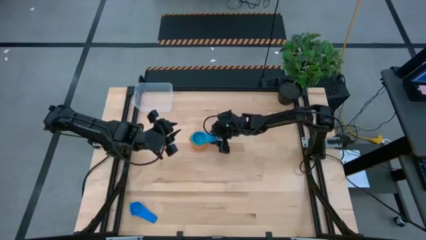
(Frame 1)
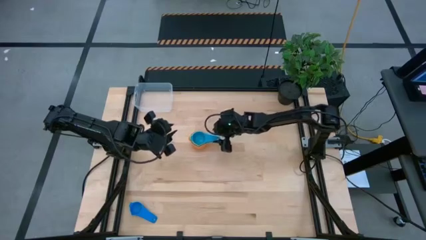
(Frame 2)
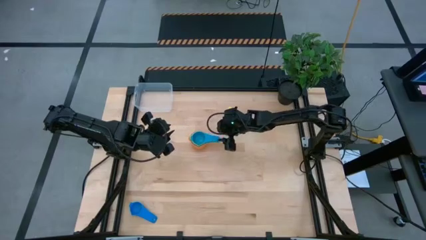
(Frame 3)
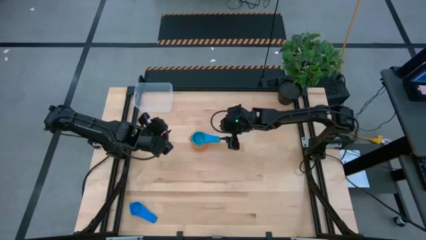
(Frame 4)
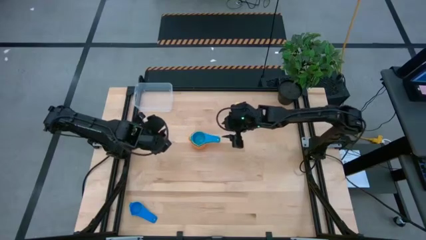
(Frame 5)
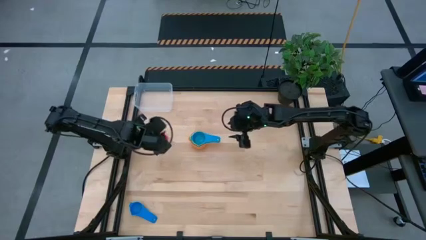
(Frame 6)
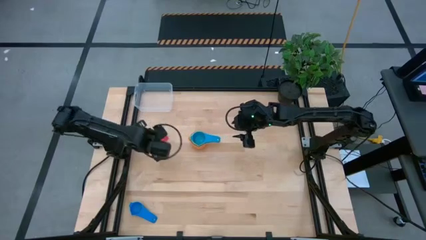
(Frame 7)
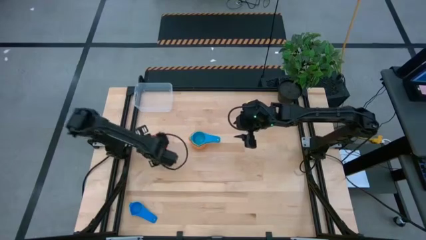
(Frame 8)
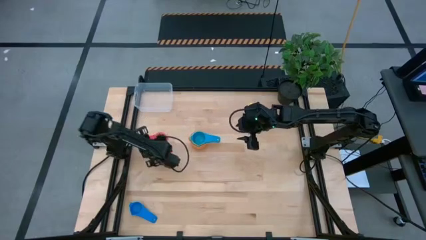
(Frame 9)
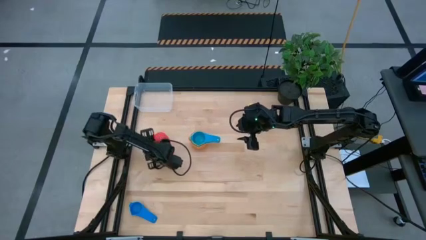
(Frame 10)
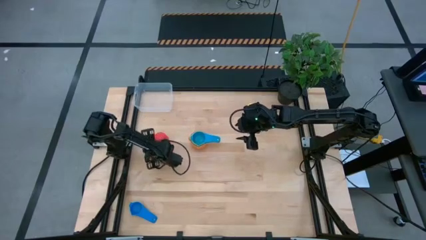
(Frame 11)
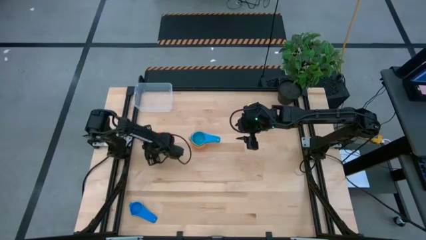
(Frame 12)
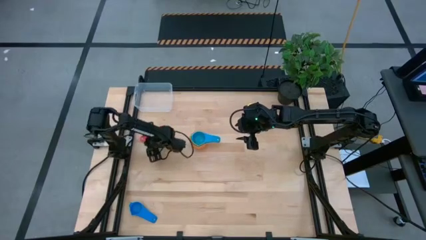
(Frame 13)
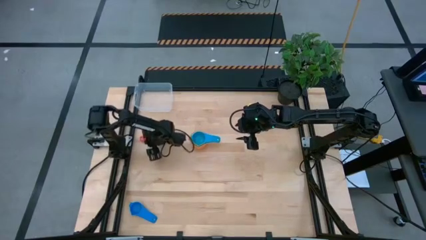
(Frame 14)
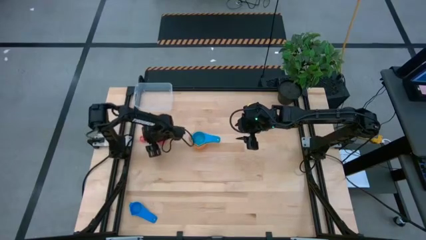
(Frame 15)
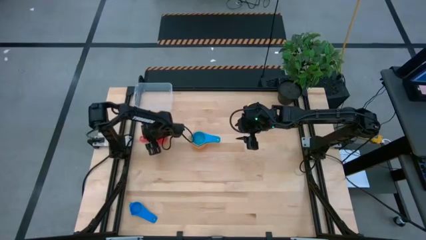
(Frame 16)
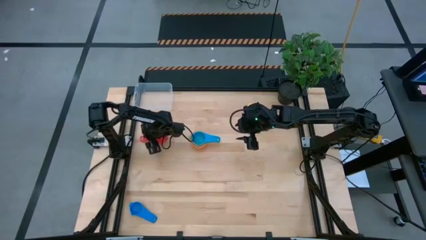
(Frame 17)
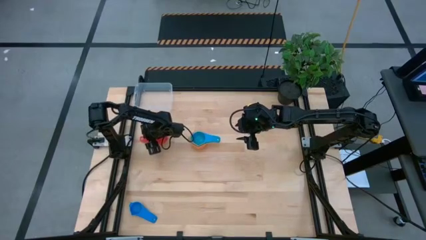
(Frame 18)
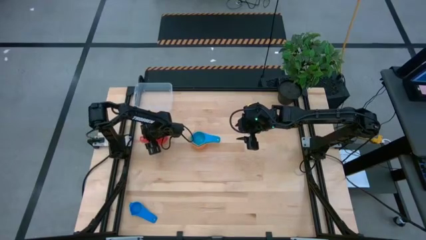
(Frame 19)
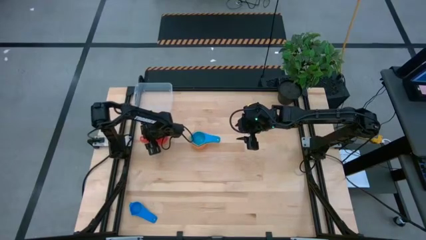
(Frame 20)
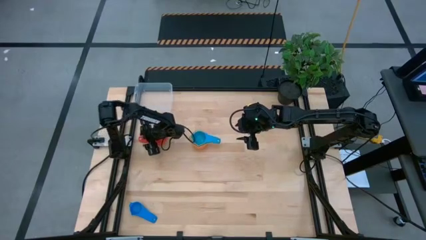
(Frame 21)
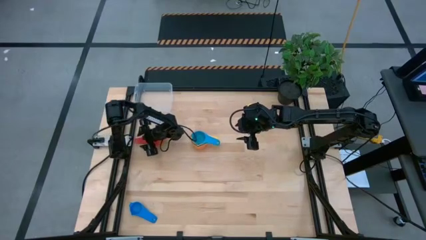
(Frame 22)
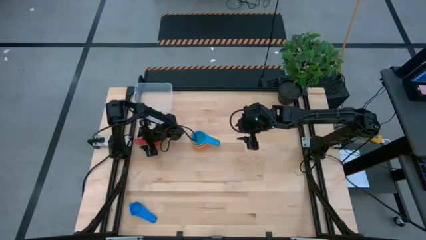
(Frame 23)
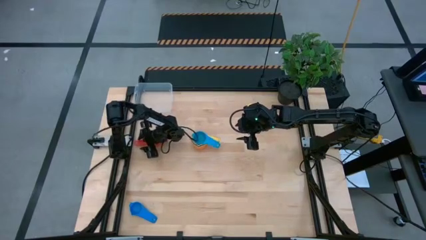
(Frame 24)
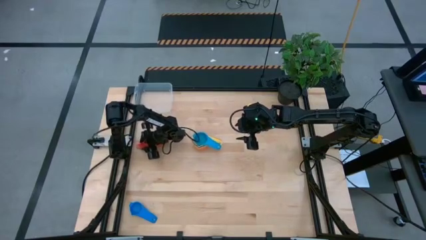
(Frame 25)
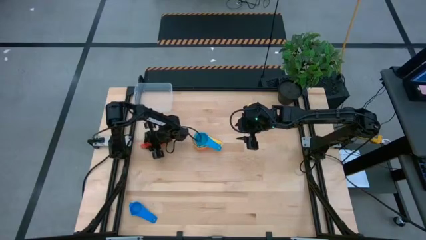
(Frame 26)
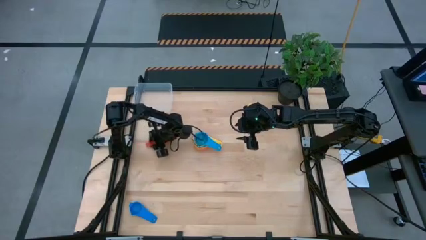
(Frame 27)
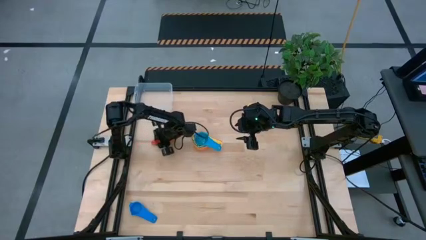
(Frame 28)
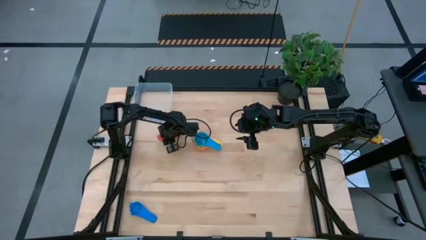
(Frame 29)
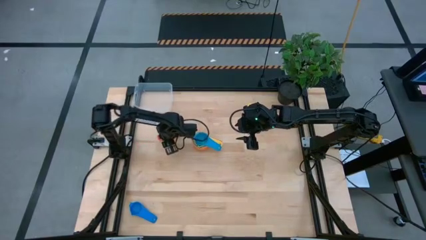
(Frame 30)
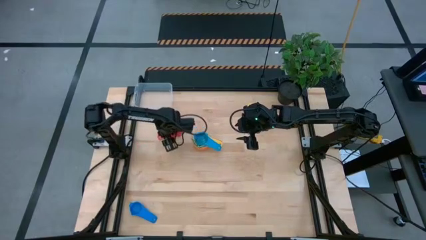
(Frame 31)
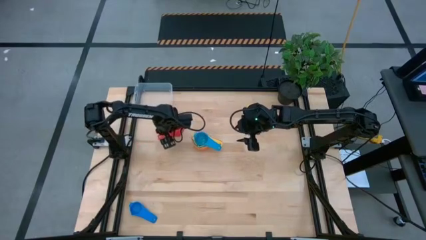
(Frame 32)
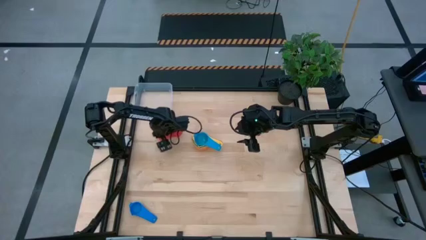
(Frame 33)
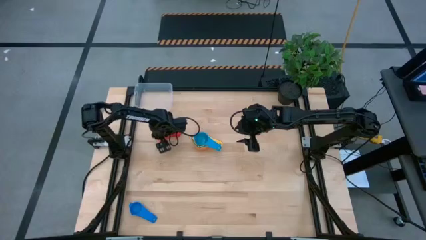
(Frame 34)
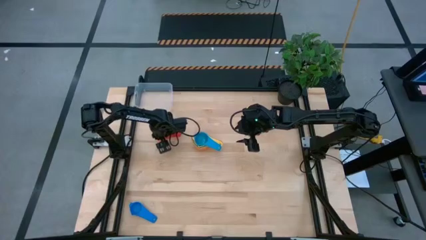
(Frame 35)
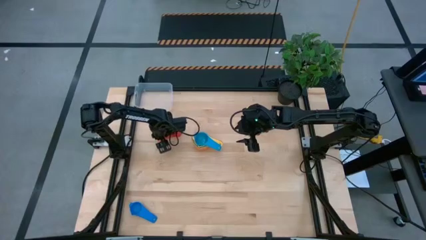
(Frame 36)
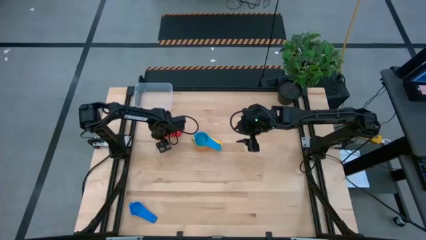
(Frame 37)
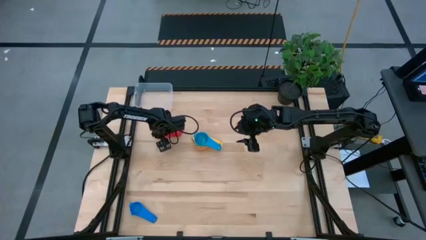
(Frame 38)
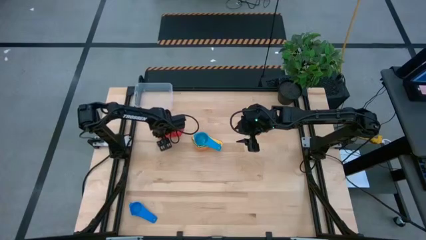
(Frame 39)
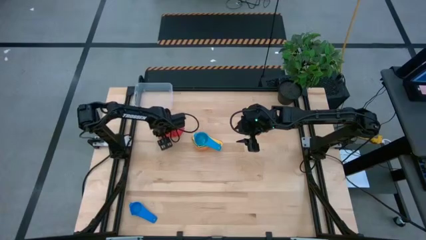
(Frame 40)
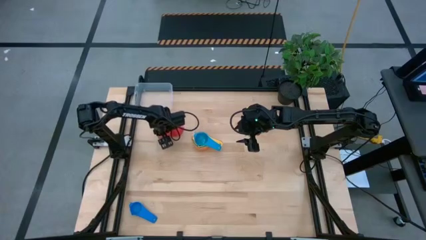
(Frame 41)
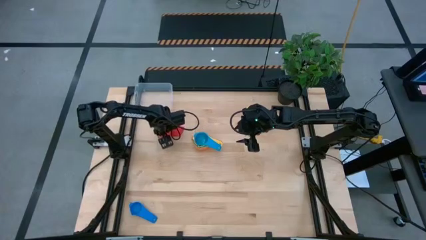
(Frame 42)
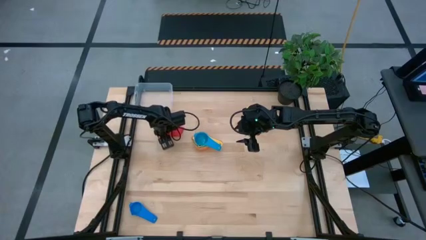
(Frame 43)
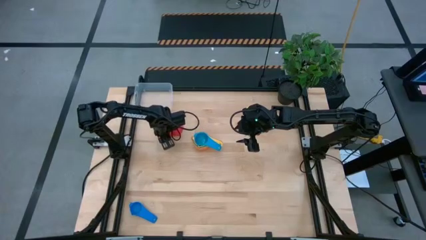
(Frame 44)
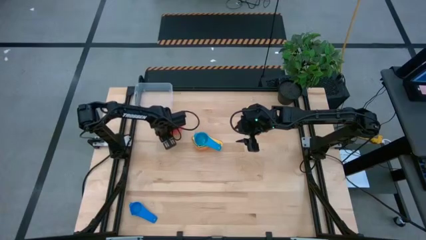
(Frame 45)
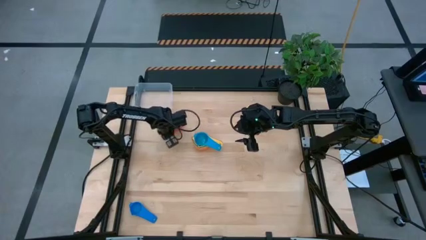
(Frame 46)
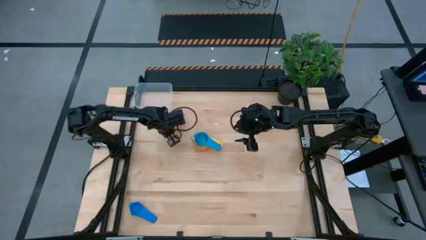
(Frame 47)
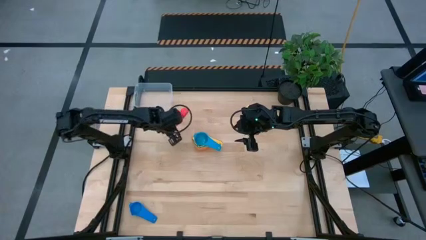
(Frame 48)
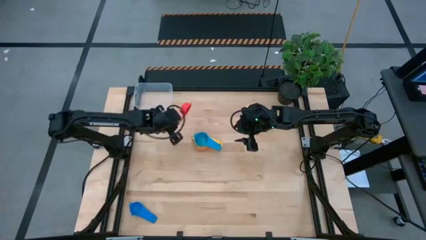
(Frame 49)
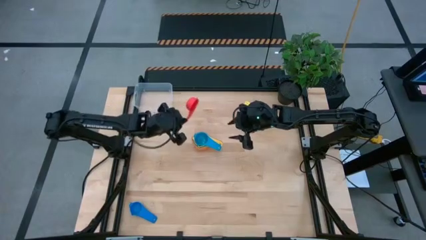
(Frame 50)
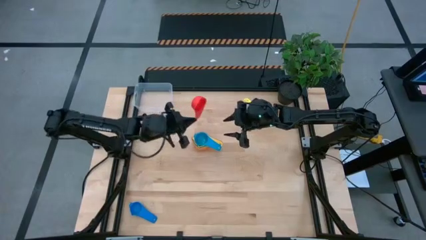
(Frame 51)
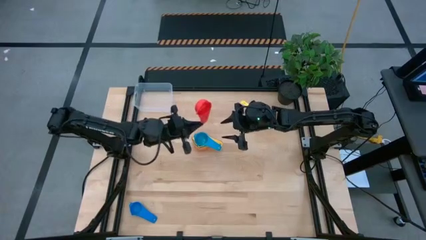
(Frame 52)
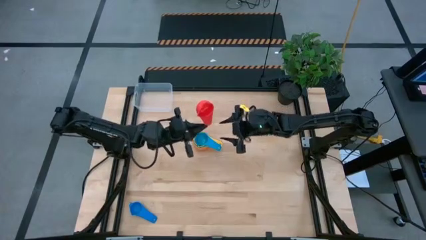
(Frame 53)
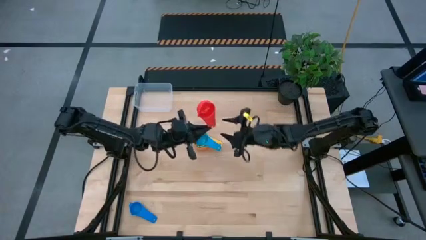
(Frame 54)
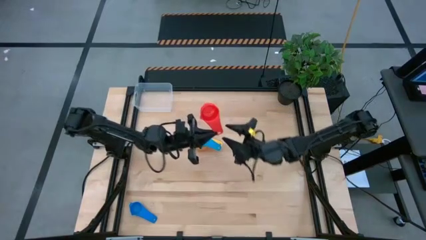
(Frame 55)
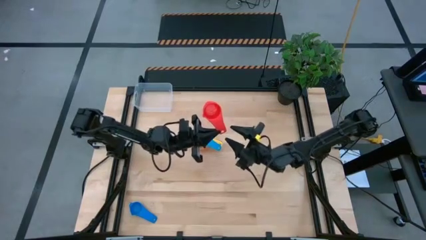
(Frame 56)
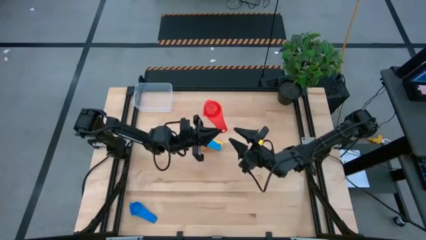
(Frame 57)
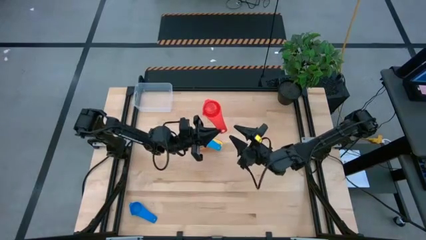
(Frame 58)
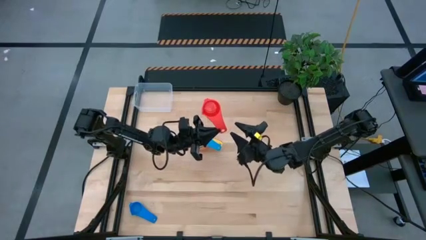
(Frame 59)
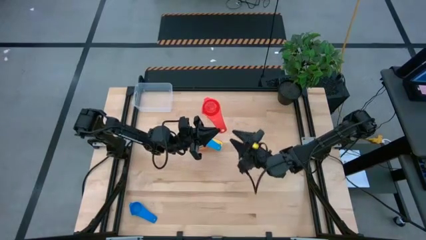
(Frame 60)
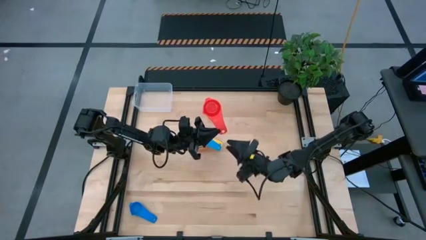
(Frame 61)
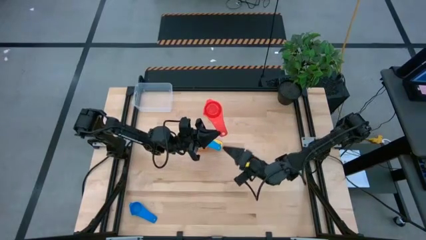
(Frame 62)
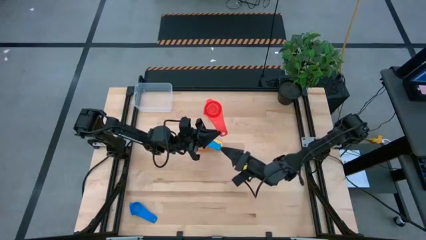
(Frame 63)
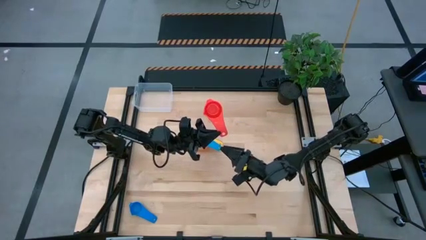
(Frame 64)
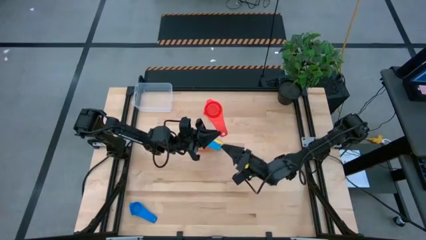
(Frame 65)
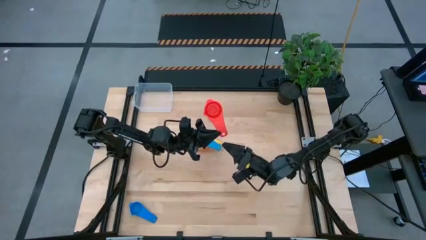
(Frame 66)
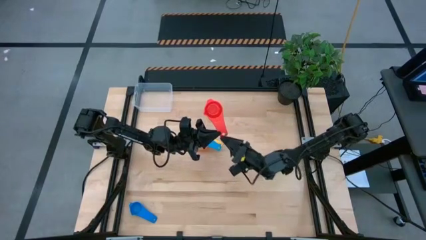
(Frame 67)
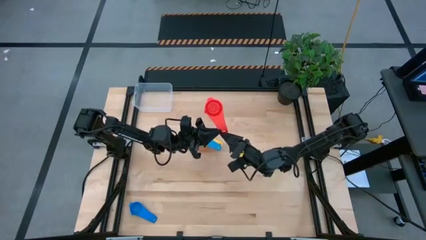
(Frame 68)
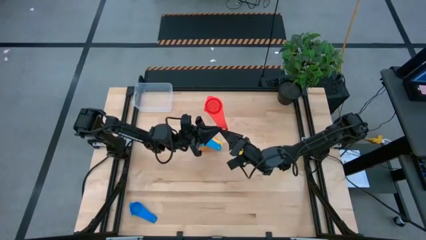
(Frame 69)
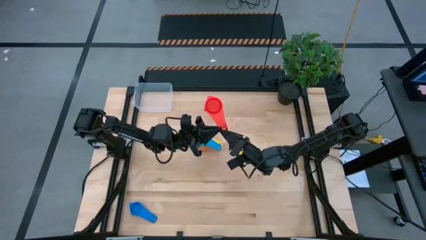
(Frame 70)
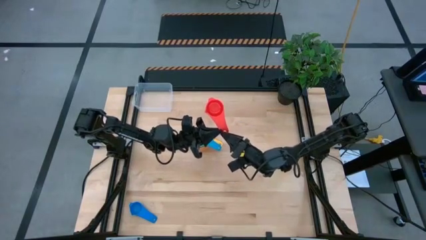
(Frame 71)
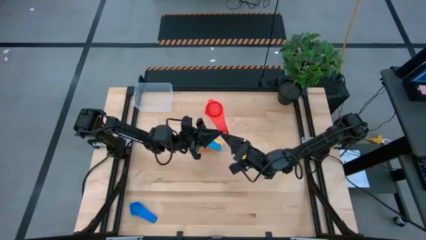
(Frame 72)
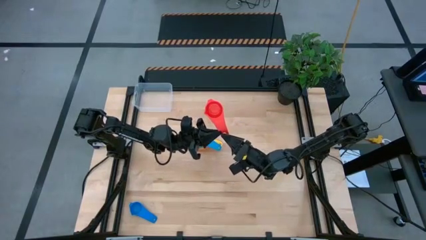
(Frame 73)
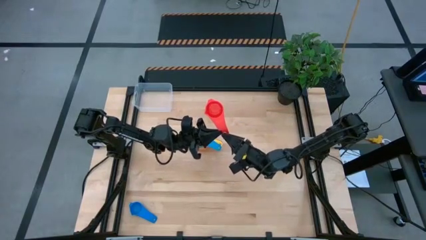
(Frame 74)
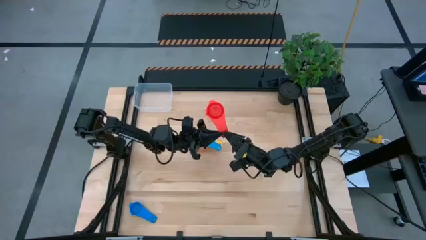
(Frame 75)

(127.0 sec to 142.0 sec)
Task: Nest measuring cups in basket
Stack the red measuring cup on top of the light blue measuring cup
